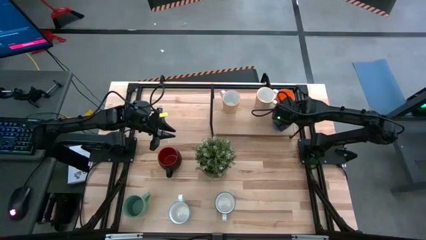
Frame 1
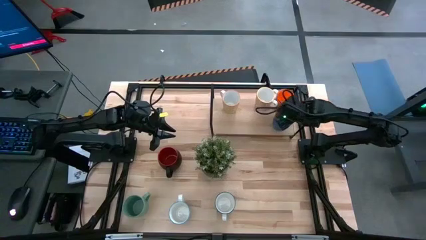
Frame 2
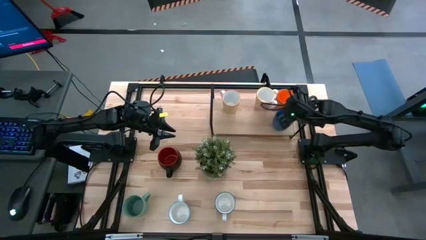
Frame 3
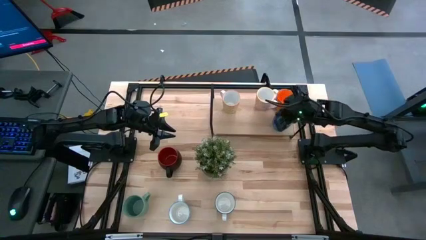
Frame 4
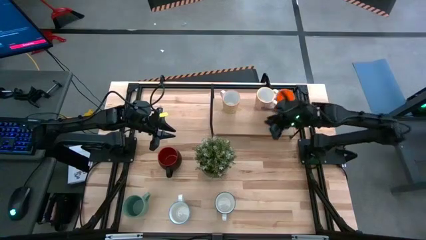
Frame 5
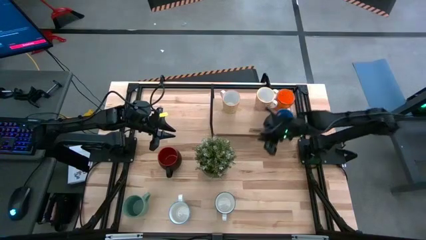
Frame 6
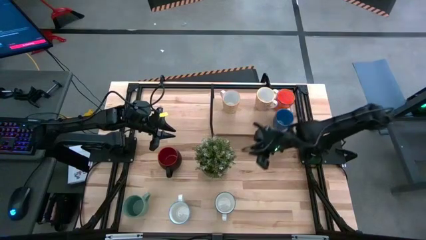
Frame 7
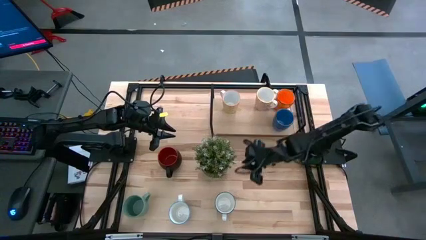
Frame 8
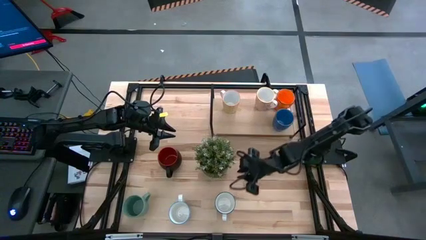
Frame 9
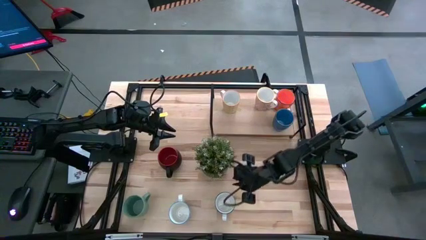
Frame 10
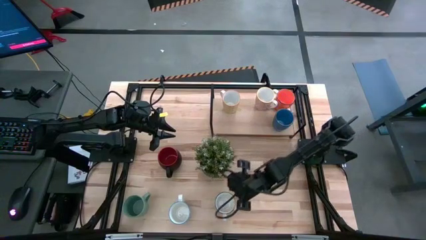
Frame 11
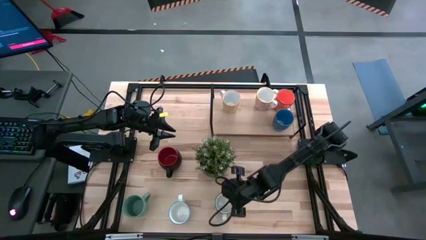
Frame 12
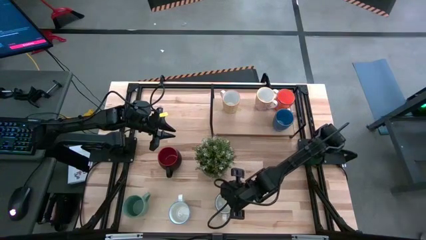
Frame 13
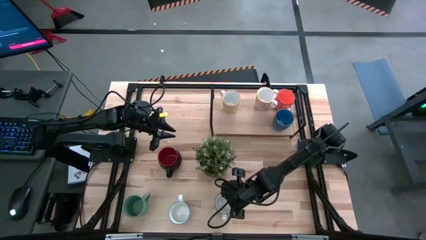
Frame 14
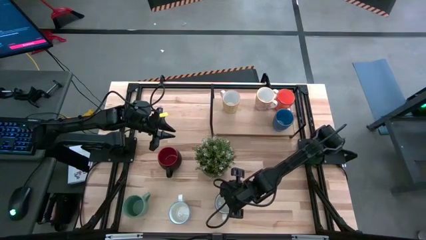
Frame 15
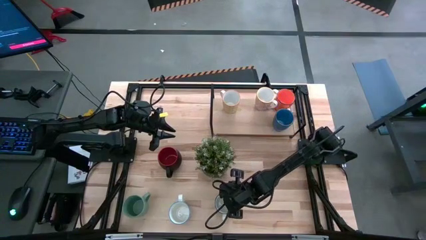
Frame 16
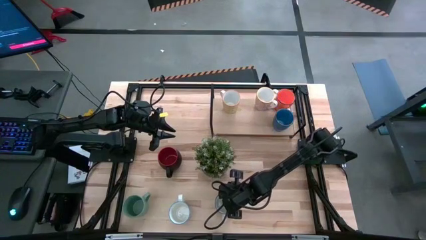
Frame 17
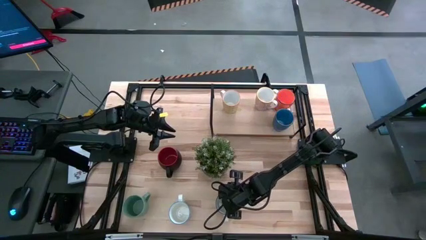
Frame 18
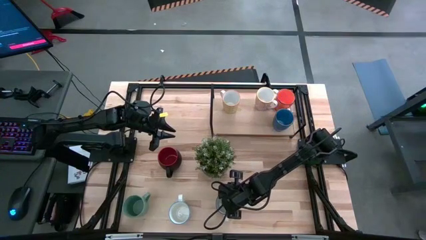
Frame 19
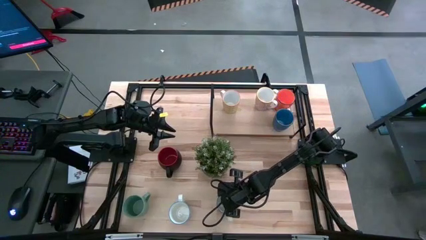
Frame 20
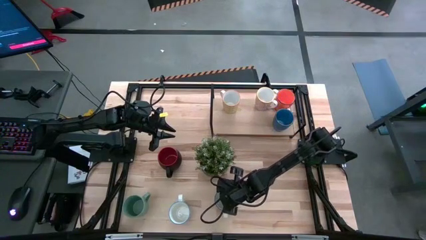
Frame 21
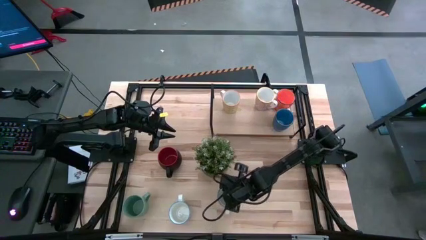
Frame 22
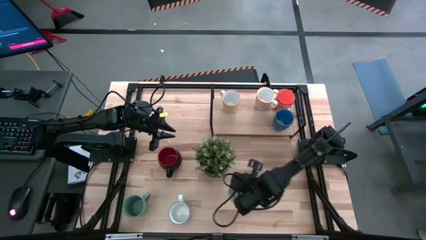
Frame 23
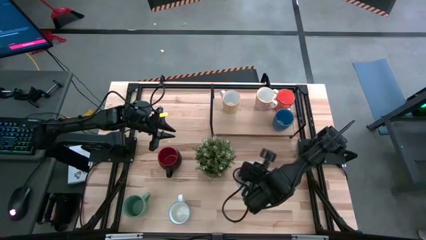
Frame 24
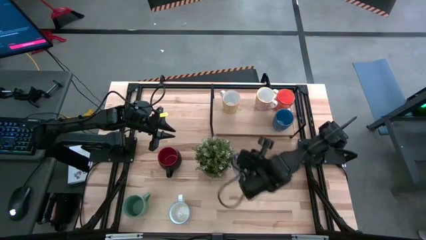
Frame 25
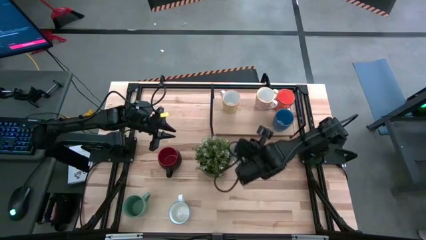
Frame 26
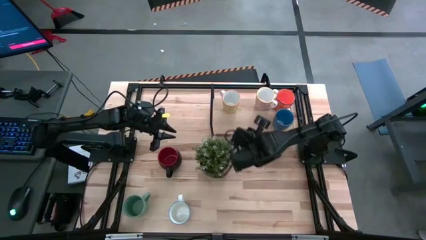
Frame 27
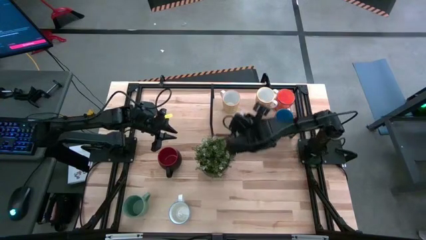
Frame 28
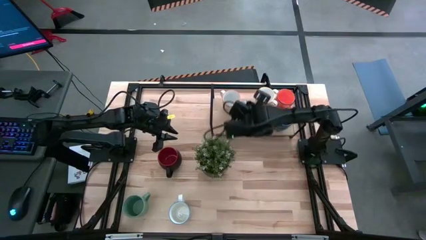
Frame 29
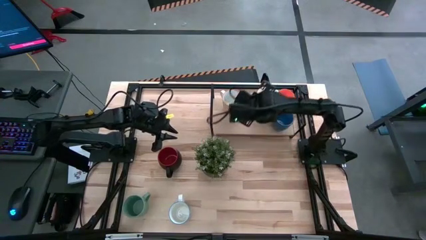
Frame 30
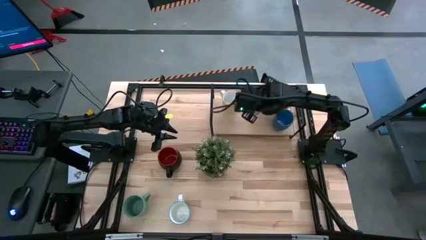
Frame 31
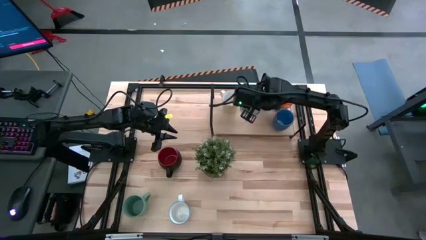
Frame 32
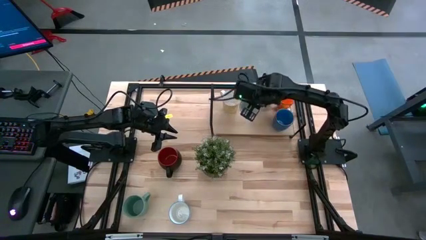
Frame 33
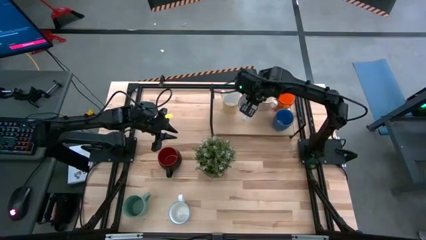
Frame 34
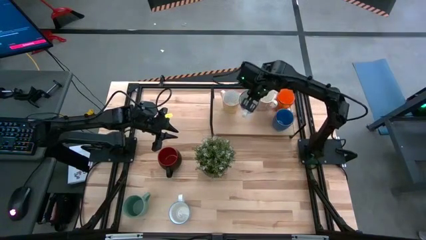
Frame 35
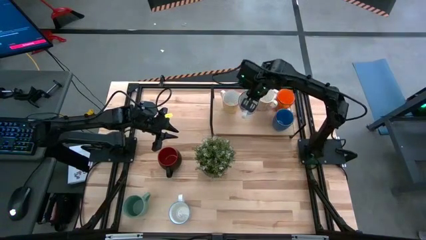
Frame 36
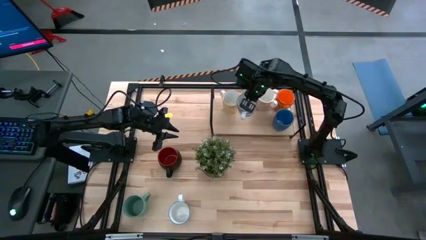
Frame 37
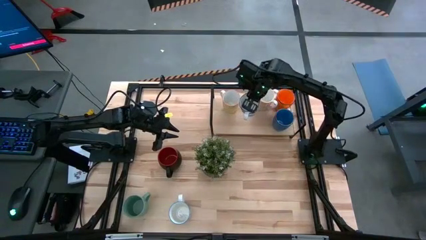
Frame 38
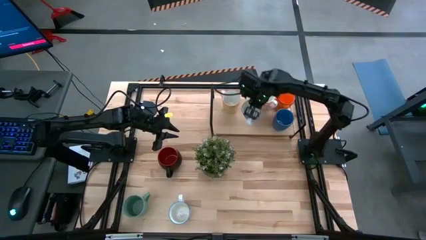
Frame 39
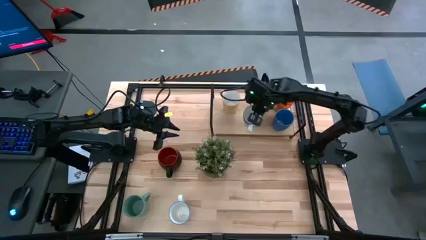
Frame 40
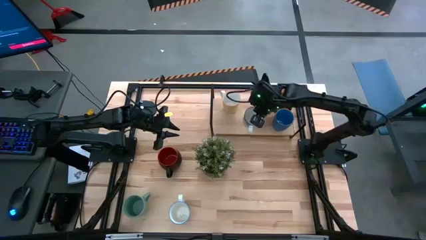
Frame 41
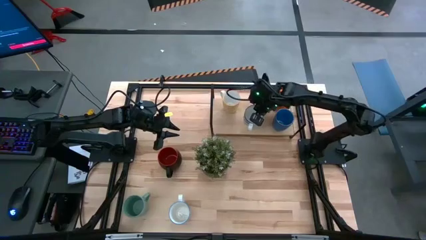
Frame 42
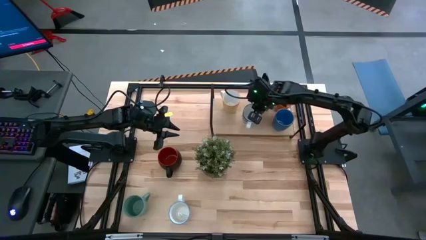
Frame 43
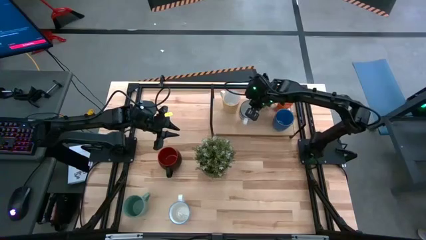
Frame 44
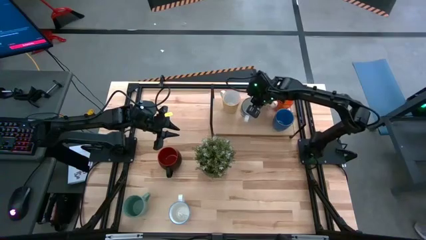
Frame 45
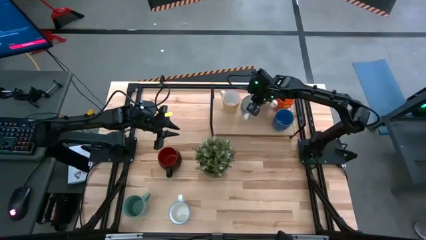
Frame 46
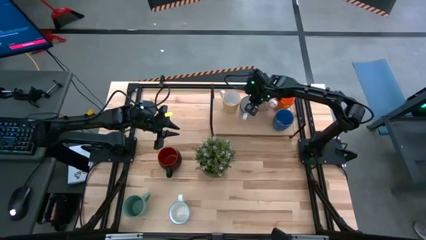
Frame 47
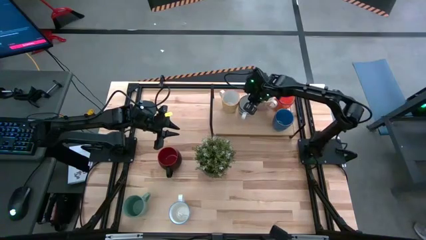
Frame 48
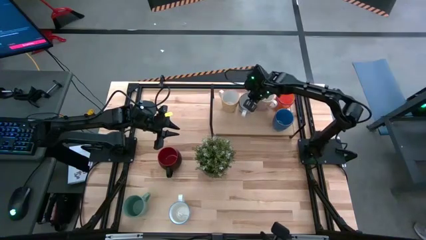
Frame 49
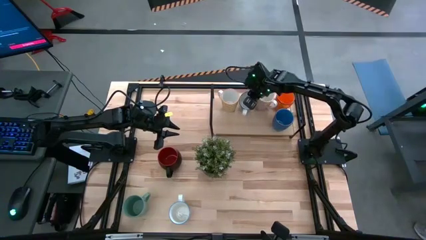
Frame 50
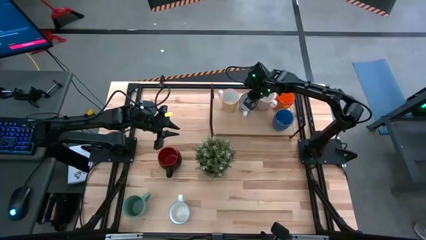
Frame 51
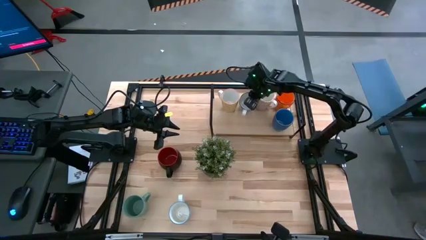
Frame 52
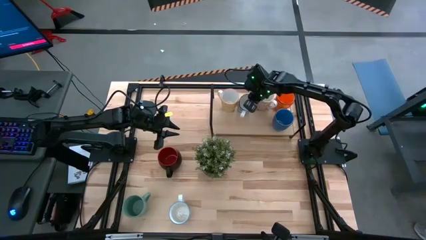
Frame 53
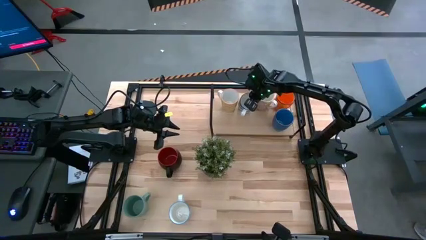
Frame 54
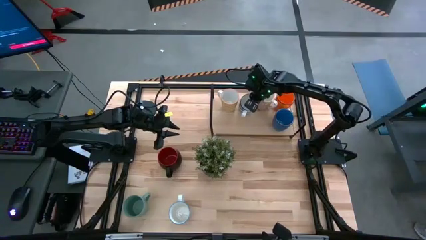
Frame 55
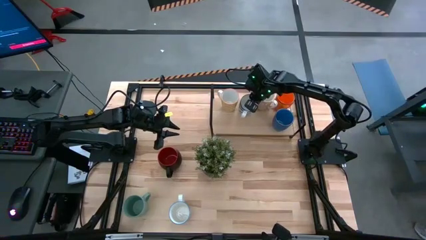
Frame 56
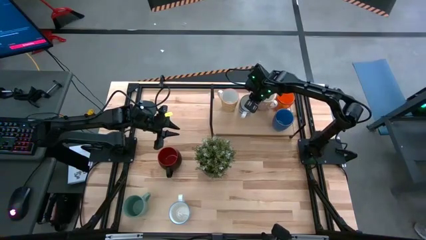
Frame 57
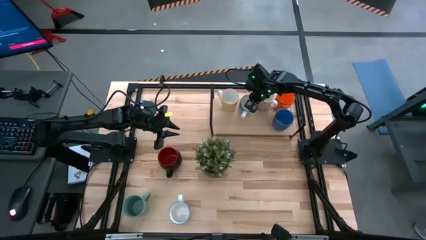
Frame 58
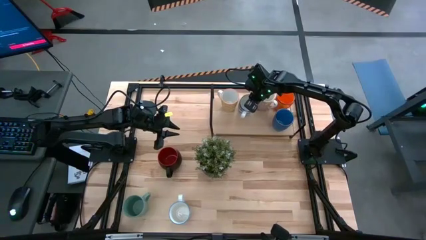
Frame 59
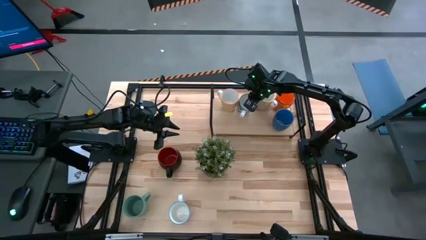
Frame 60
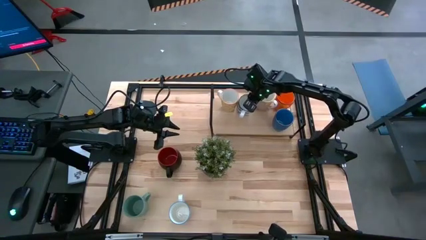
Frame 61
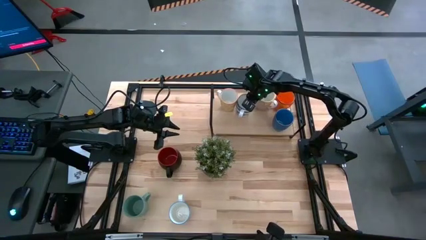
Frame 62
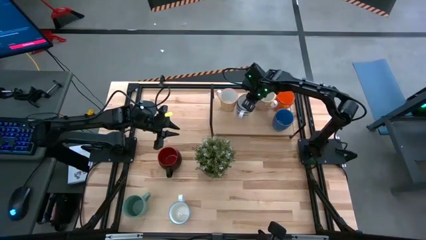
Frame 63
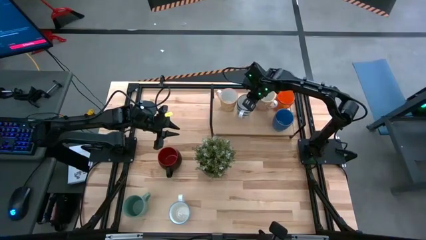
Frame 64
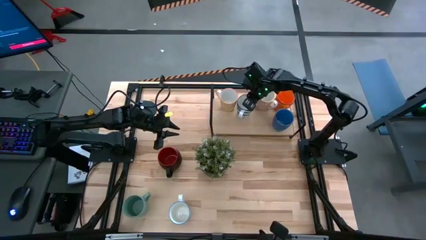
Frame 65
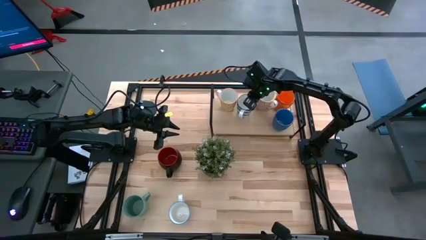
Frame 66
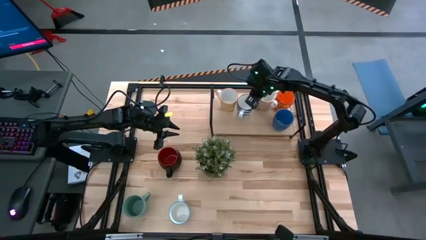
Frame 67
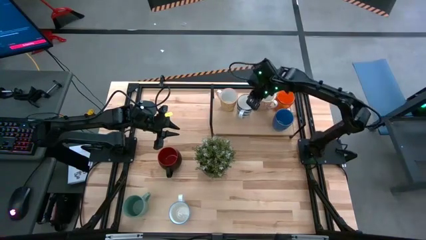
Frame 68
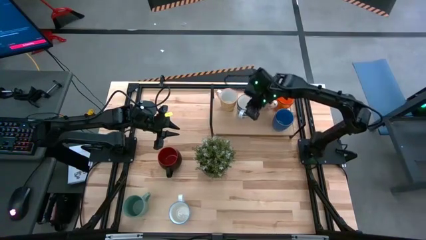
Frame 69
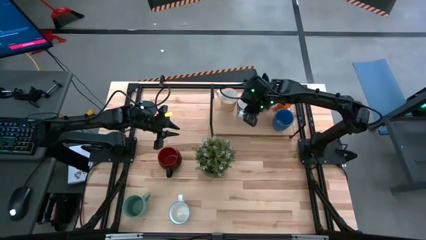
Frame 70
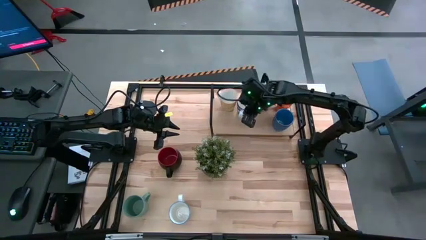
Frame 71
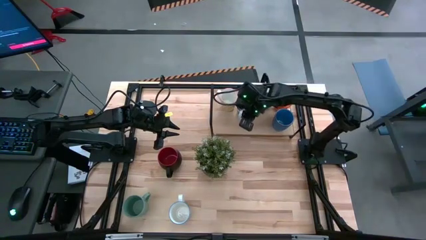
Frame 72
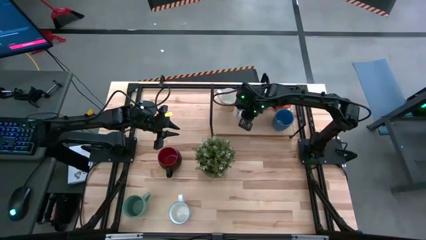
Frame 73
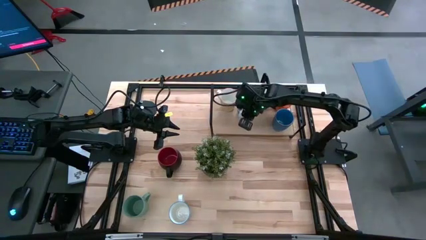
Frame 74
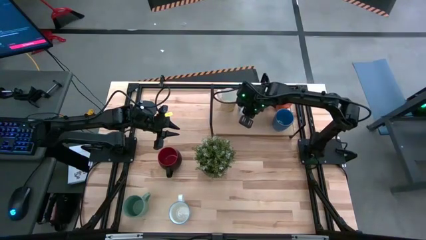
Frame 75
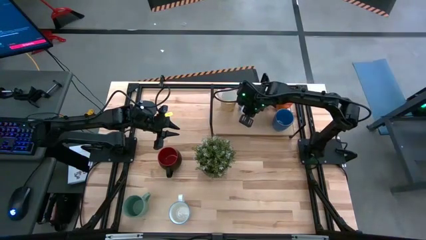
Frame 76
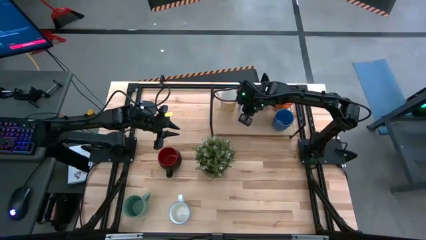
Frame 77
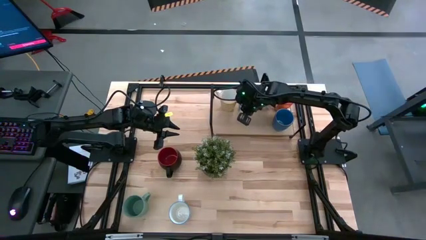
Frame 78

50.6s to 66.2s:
Task: Place coffee mugs
Put the patterned blue mug on the shelf
